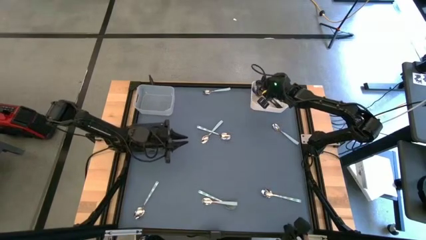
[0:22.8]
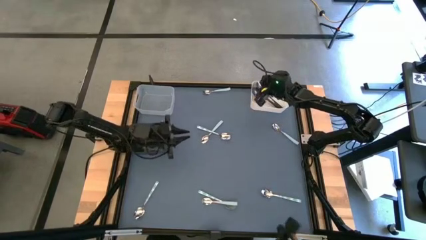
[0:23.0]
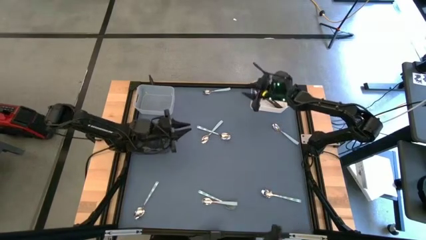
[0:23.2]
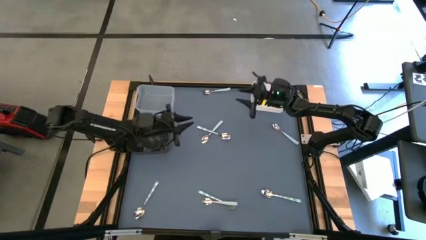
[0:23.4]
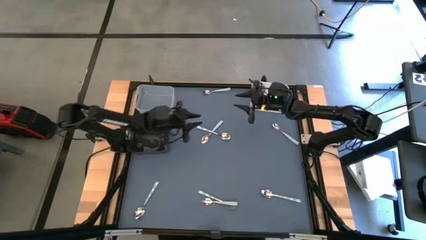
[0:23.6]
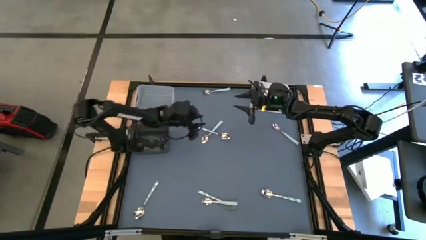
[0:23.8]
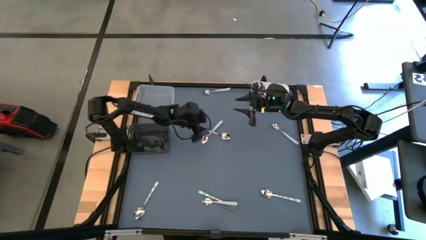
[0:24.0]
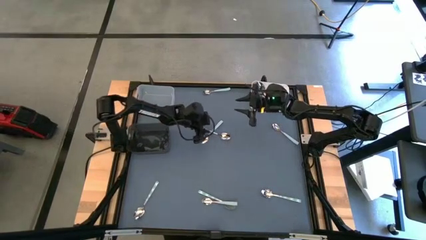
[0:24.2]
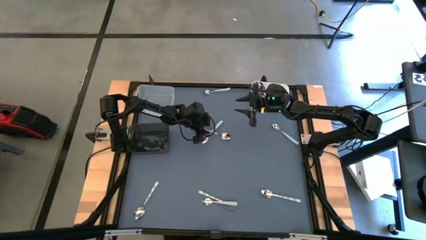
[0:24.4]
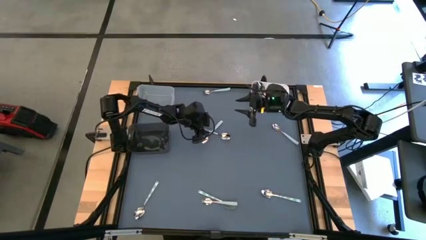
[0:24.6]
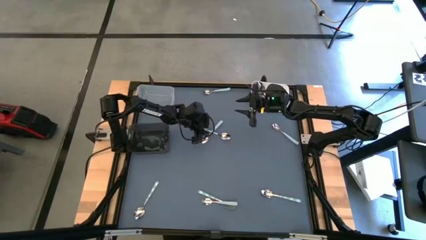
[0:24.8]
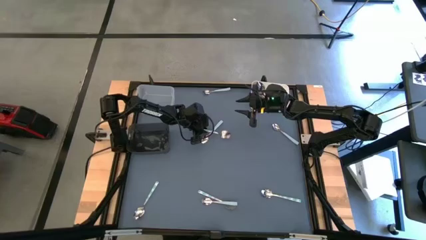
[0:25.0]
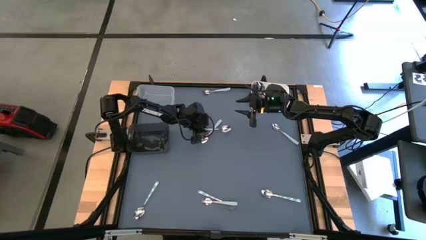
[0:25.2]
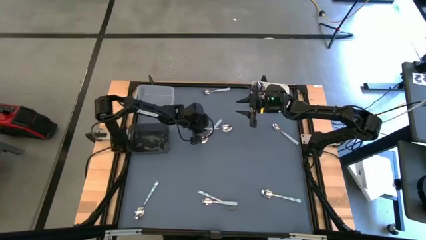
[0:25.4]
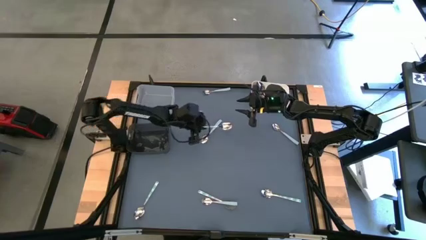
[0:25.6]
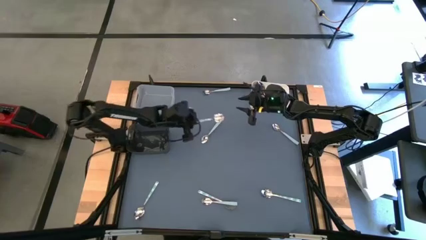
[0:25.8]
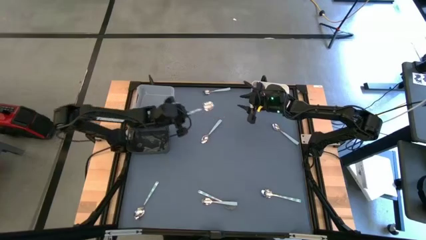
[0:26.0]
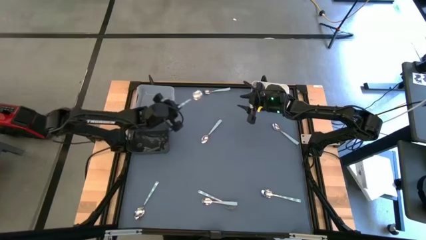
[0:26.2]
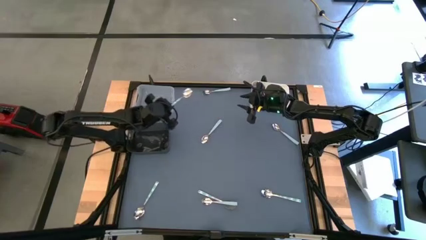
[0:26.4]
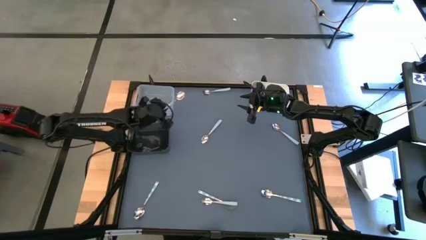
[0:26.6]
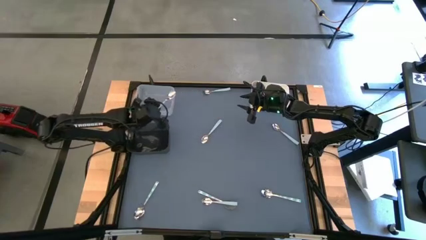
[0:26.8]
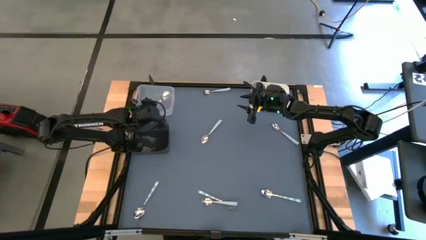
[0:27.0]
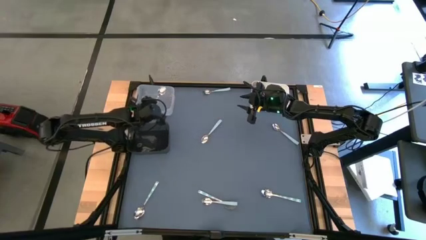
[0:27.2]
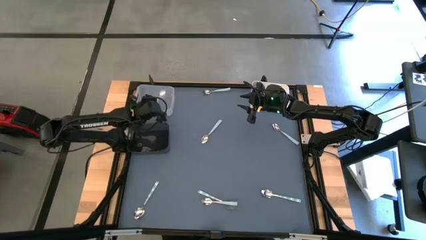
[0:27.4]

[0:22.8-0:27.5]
Task: Sort silverware by color (type)
Put the green spoon into the transparent bin

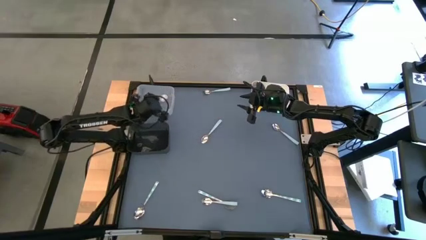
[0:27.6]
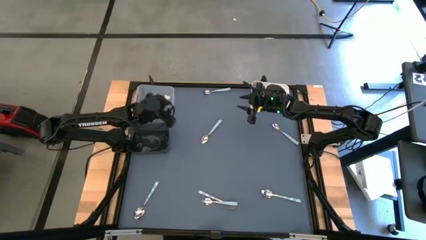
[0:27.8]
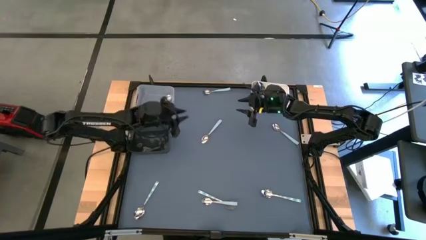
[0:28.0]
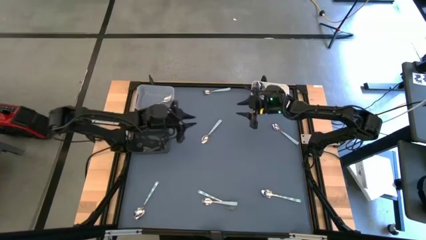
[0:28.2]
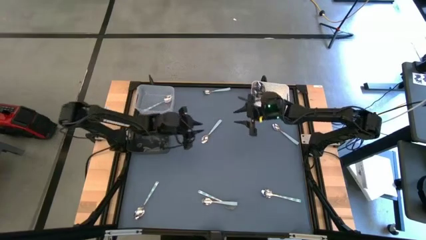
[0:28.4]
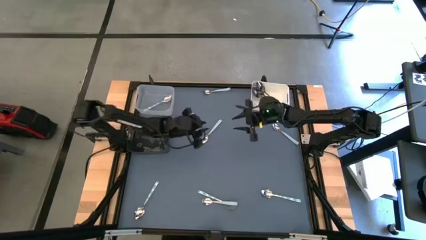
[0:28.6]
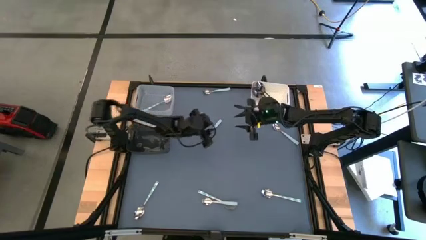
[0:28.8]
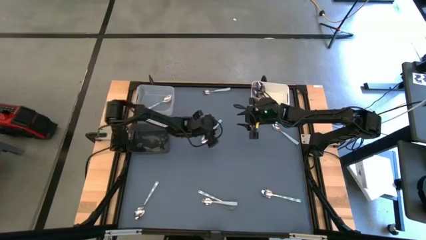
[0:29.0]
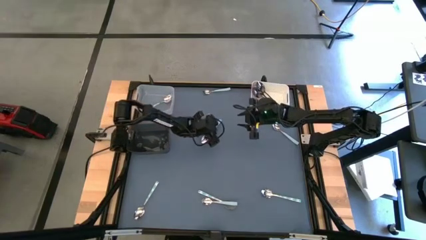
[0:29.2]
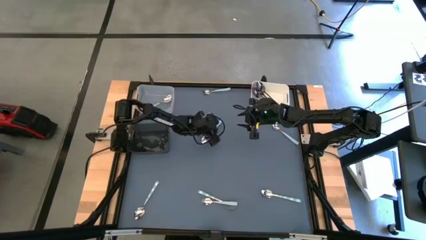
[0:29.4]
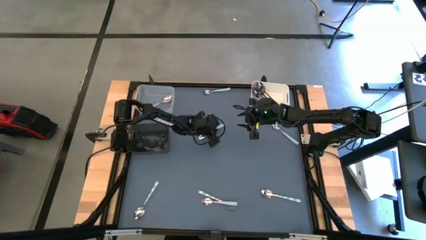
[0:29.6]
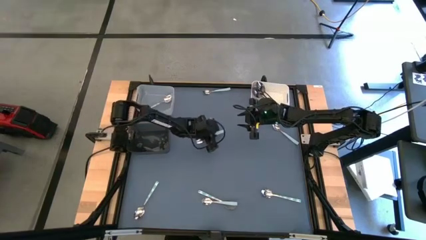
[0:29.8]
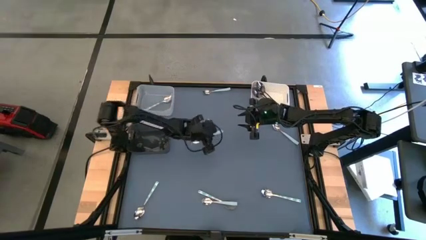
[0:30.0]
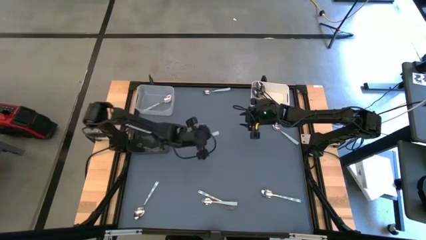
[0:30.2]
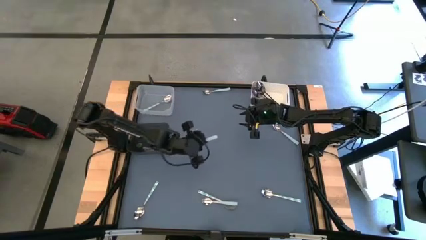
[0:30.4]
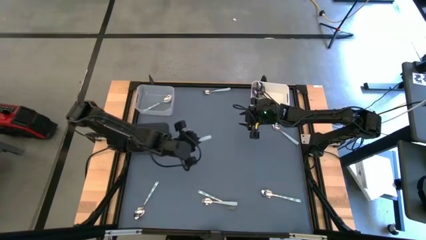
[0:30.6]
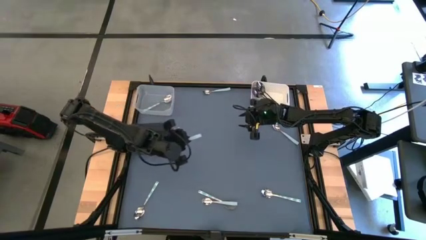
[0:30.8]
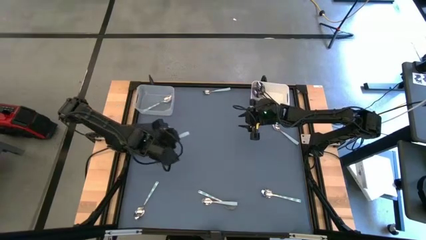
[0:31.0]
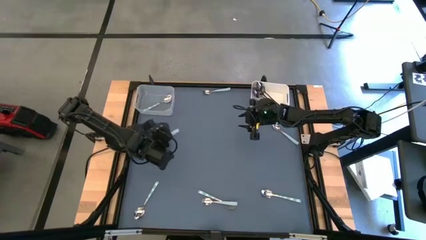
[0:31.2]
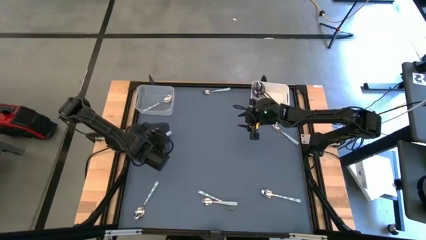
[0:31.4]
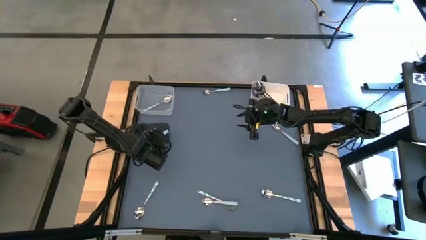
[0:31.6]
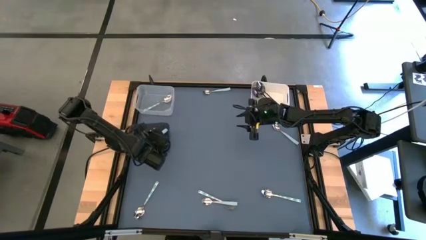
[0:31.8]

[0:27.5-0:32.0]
Put the blue spoon into the black bin

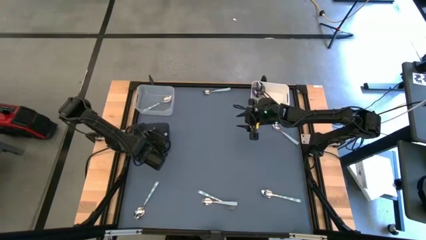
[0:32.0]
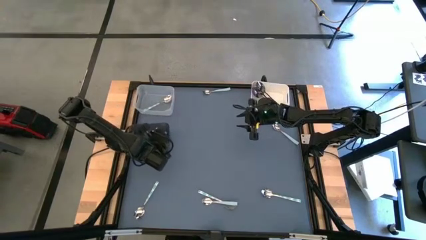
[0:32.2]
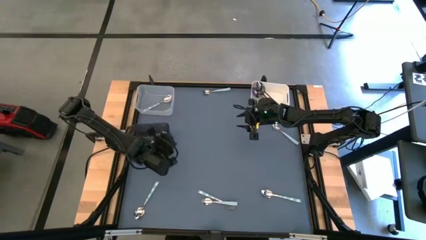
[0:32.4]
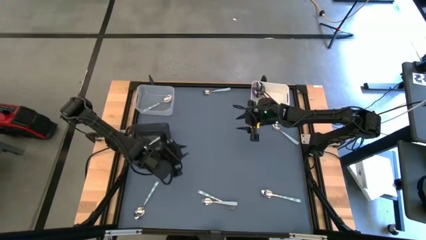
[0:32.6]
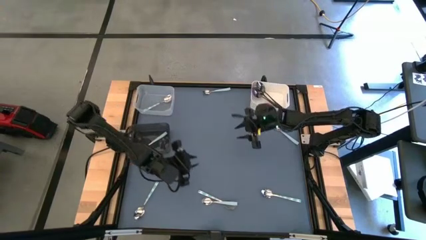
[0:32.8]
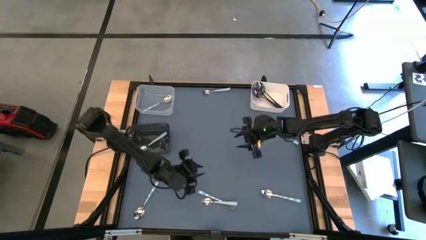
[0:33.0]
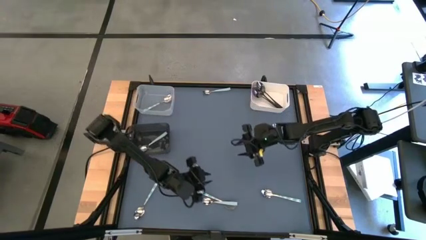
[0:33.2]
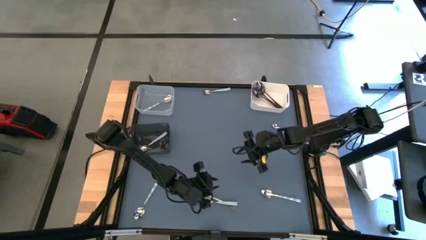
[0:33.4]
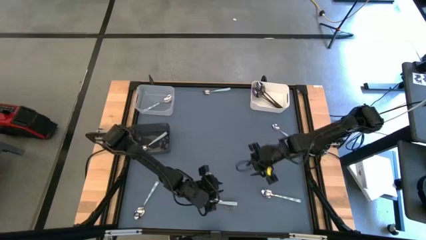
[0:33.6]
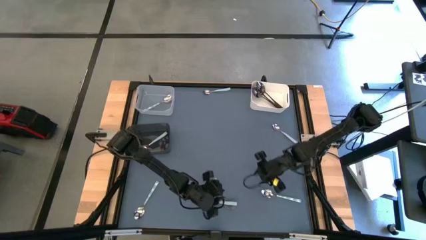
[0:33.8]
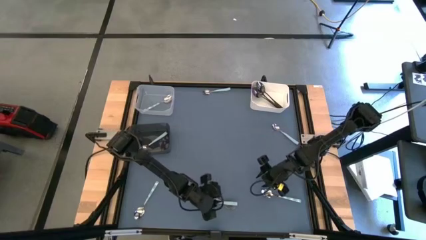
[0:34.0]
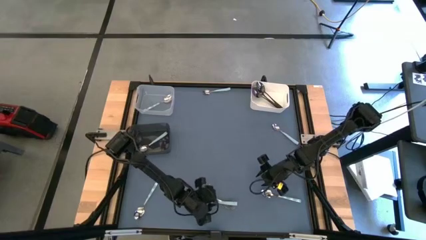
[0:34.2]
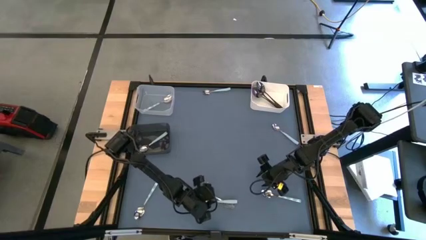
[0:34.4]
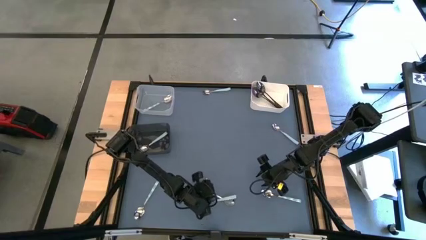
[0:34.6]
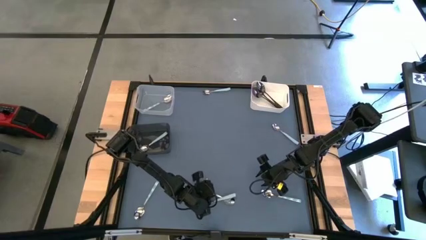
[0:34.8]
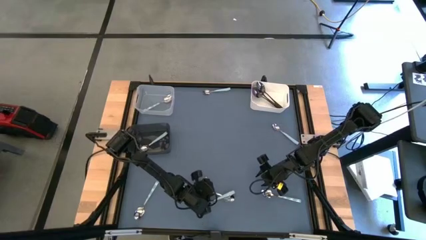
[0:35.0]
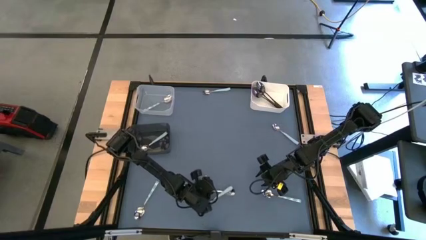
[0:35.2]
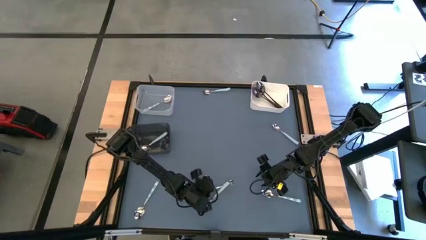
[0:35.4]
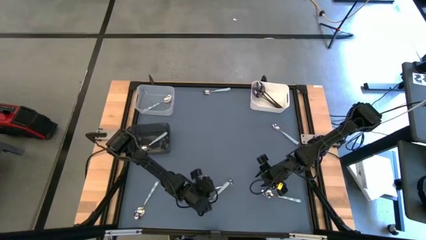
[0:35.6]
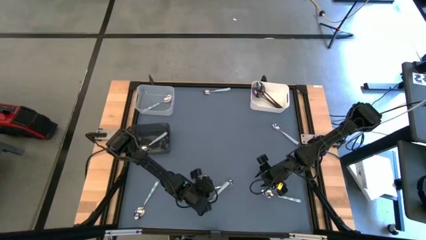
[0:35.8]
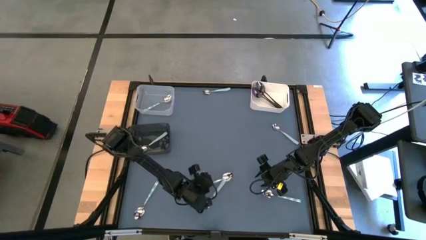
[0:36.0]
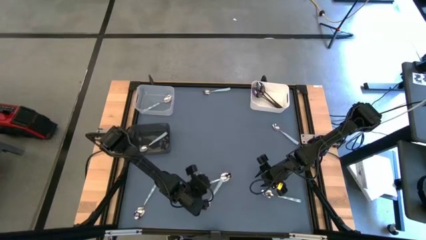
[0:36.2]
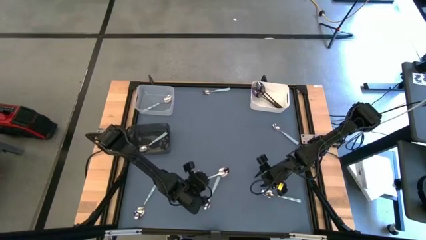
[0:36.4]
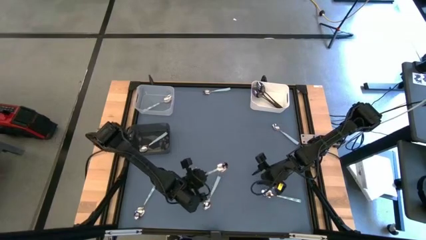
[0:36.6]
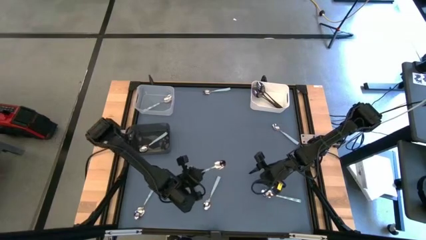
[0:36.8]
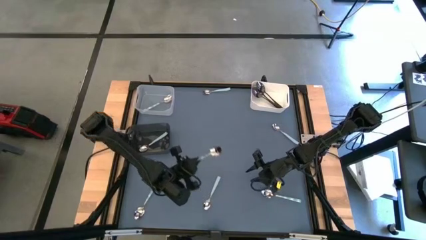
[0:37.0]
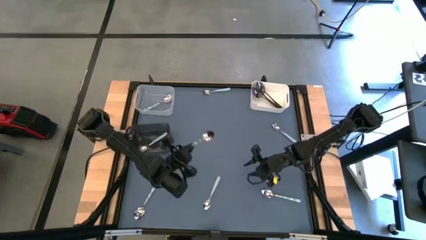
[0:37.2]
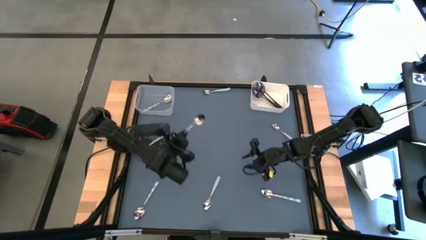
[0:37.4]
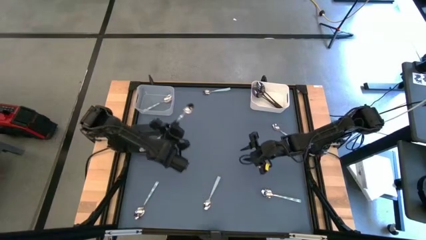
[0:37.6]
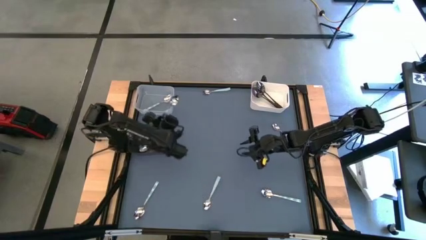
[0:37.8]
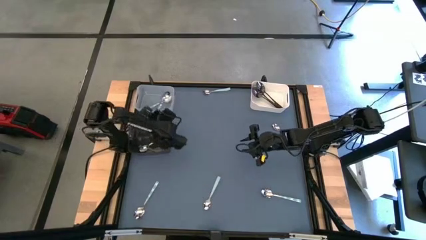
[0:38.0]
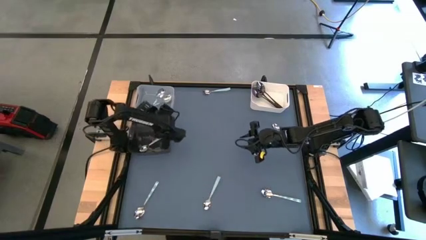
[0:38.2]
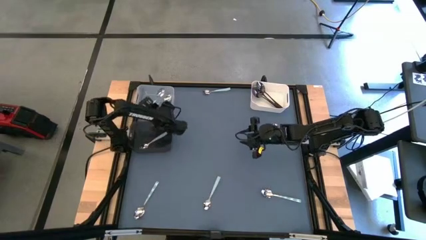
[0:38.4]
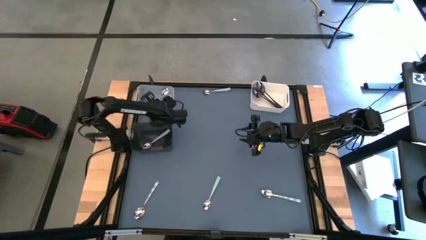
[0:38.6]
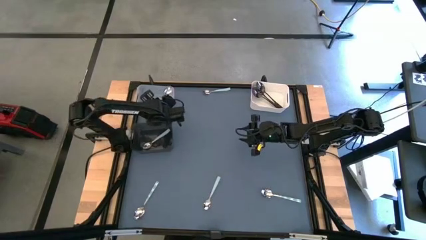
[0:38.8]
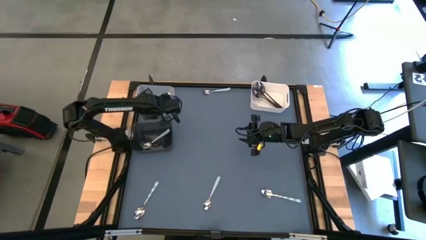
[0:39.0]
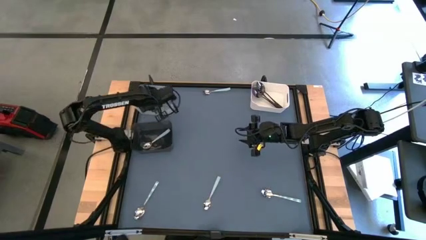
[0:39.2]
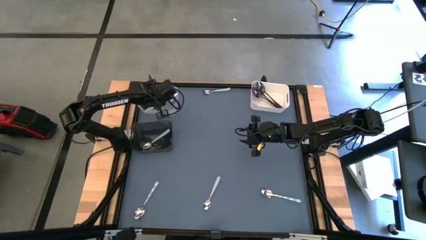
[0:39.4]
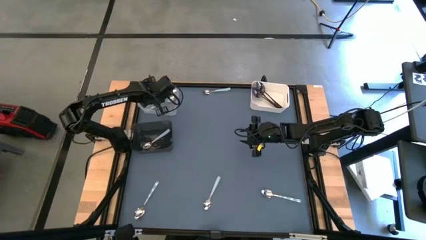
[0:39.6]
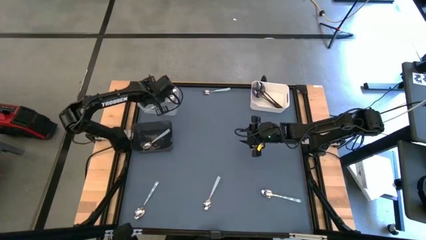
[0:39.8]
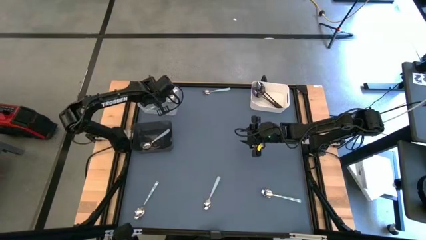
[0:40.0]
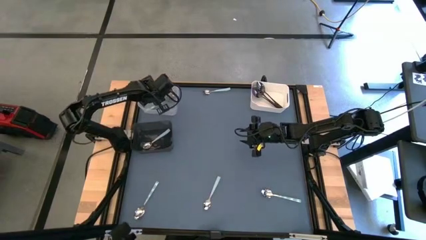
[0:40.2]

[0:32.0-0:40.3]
Put the green spoon into the transparent bin
